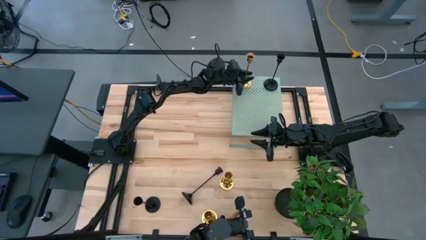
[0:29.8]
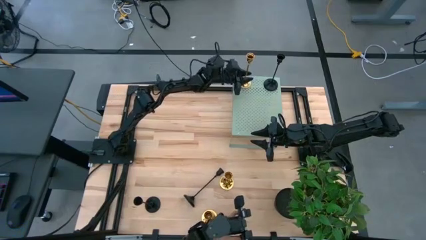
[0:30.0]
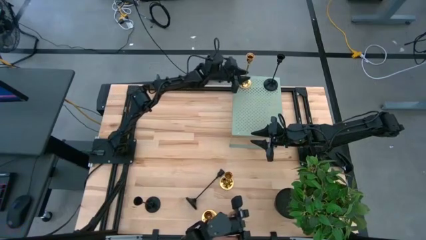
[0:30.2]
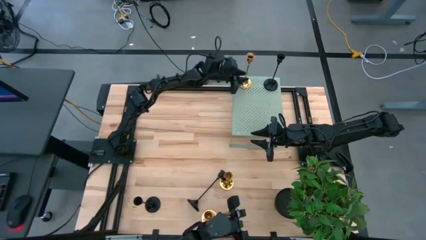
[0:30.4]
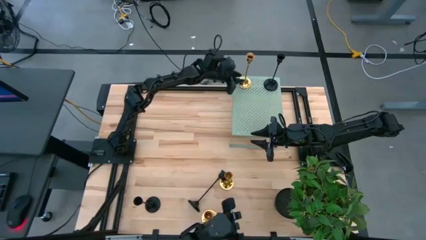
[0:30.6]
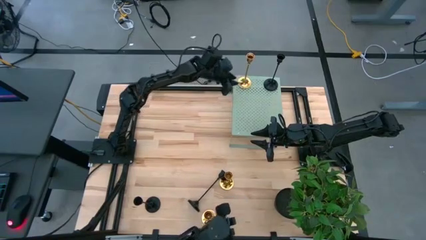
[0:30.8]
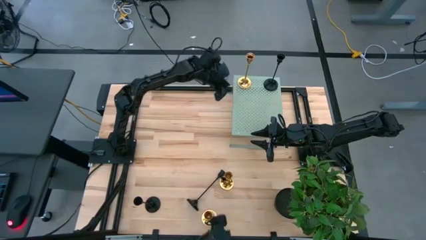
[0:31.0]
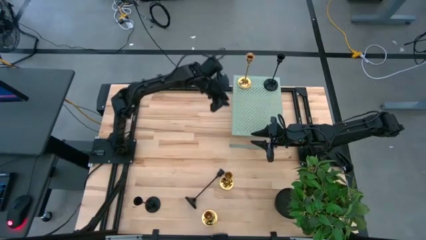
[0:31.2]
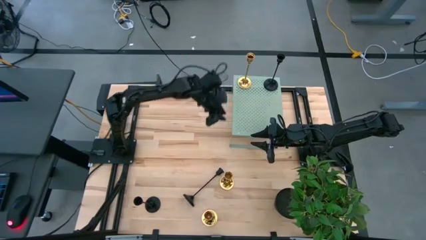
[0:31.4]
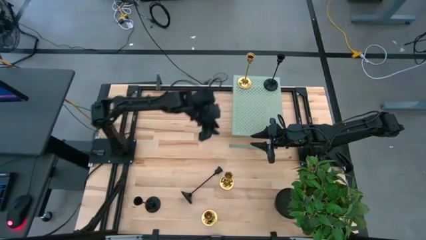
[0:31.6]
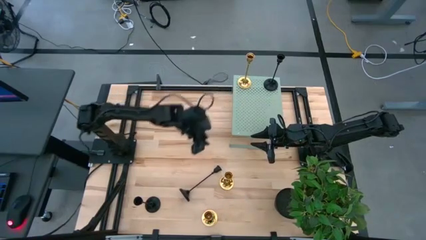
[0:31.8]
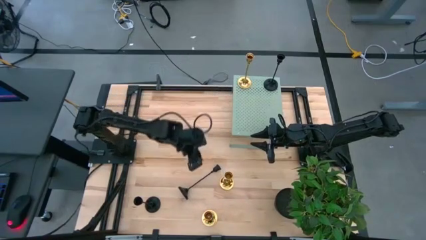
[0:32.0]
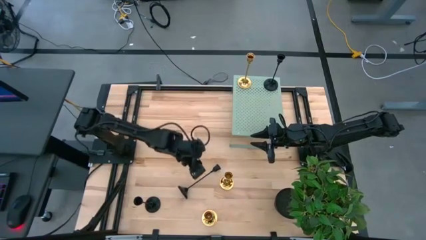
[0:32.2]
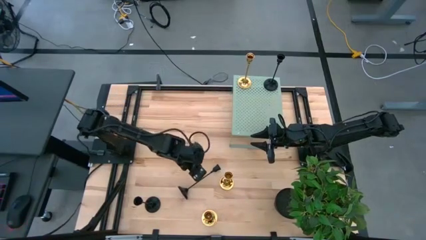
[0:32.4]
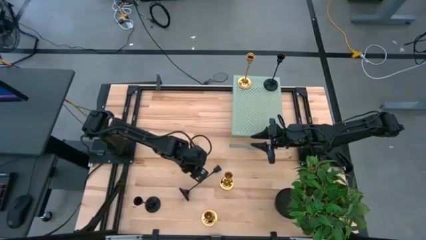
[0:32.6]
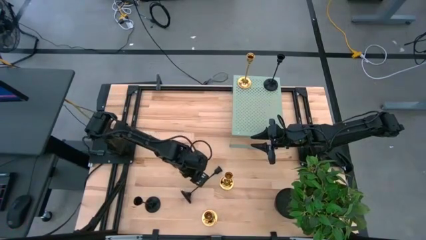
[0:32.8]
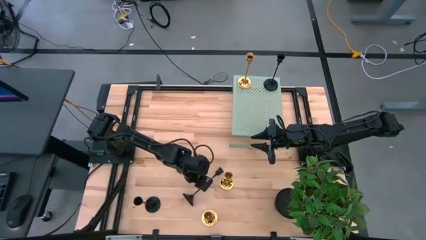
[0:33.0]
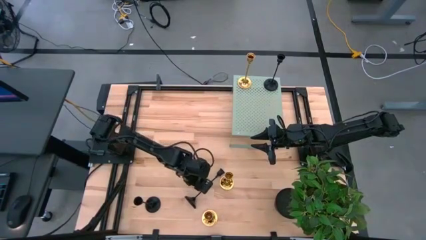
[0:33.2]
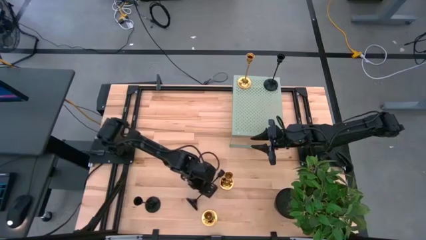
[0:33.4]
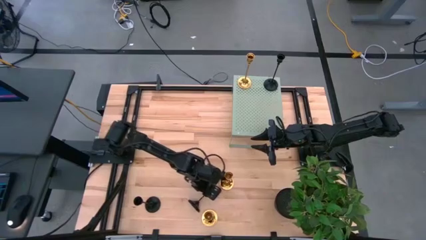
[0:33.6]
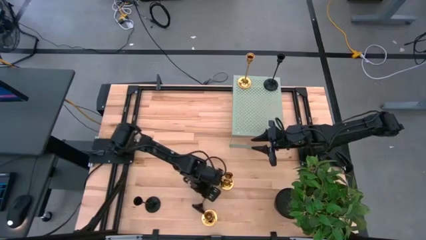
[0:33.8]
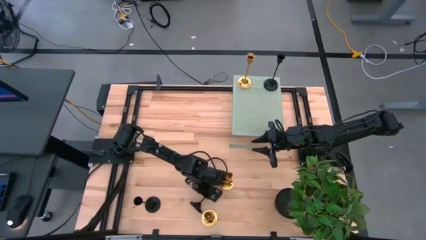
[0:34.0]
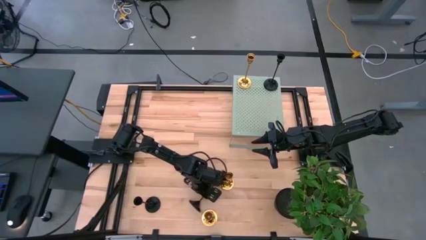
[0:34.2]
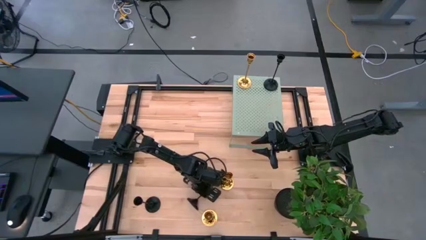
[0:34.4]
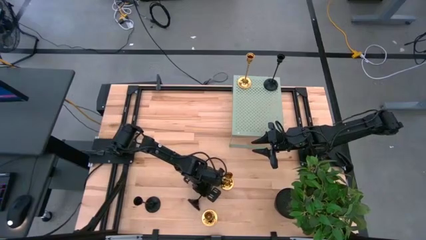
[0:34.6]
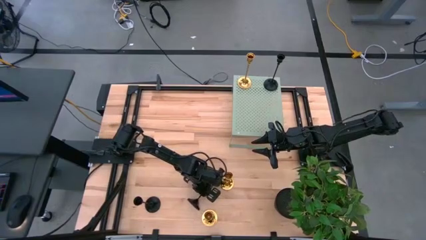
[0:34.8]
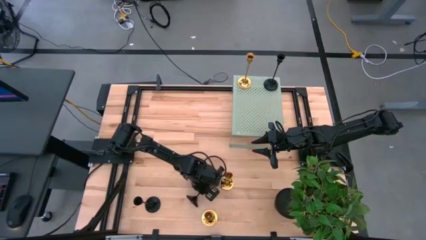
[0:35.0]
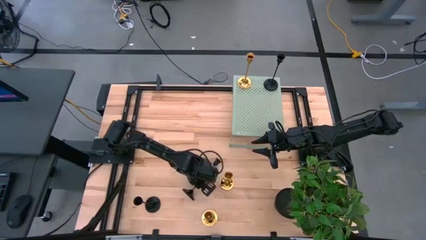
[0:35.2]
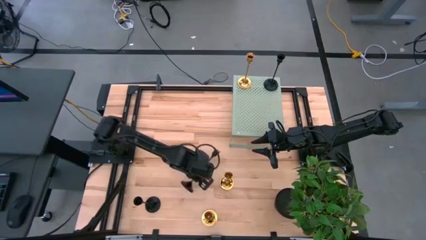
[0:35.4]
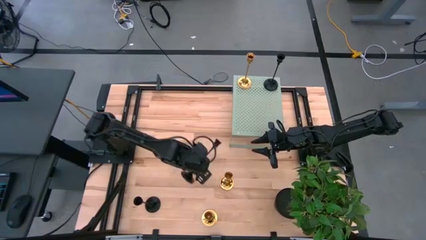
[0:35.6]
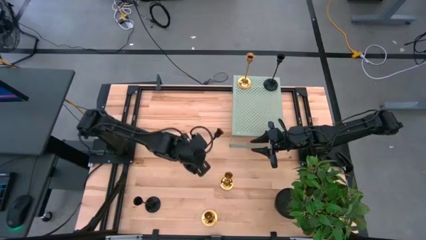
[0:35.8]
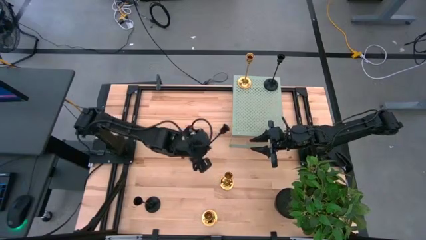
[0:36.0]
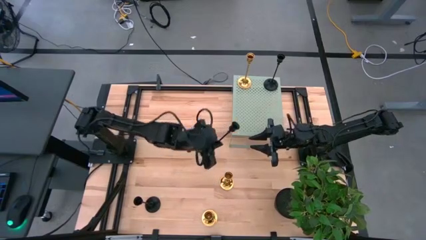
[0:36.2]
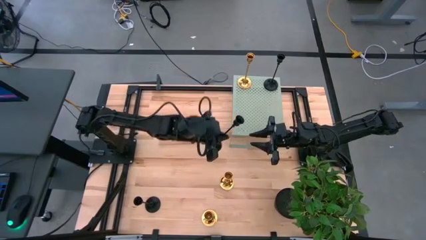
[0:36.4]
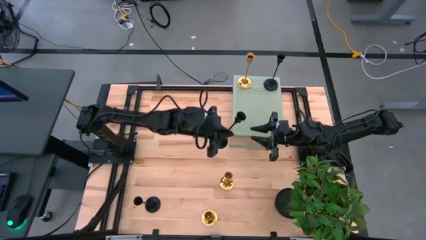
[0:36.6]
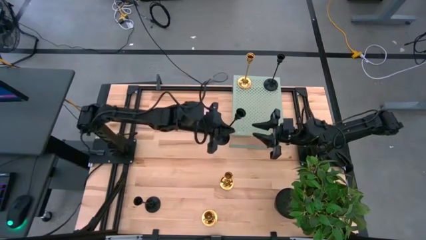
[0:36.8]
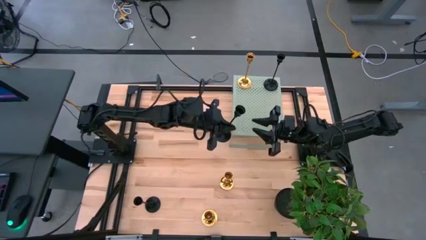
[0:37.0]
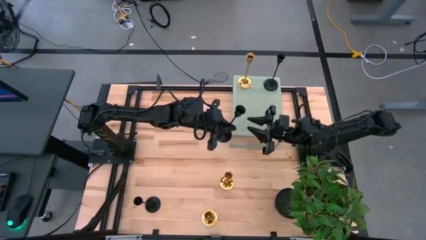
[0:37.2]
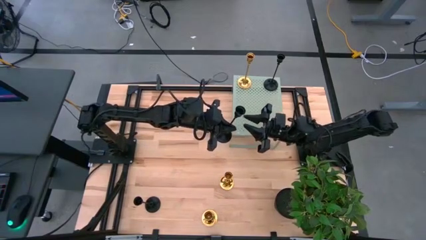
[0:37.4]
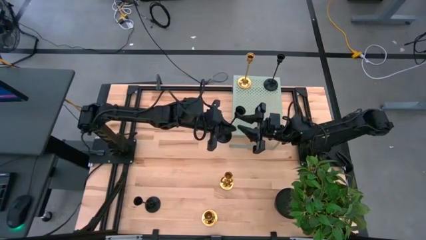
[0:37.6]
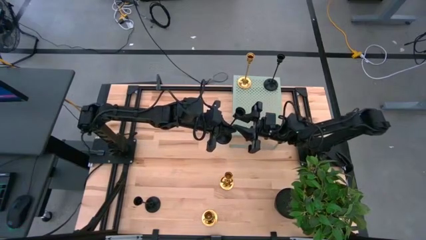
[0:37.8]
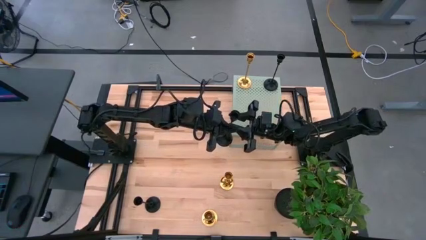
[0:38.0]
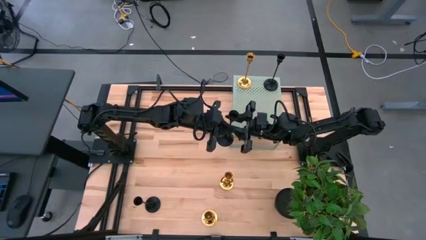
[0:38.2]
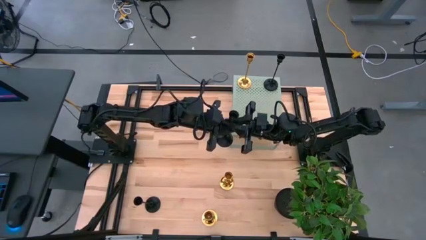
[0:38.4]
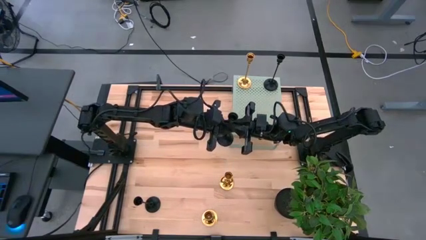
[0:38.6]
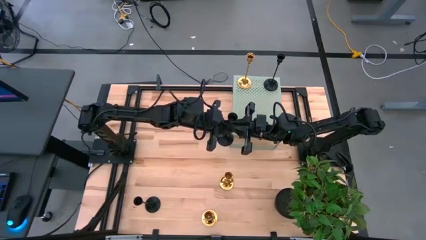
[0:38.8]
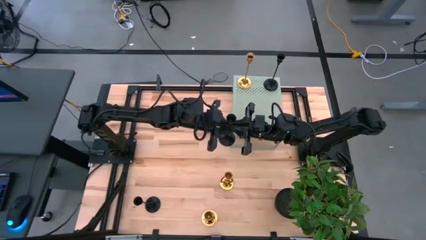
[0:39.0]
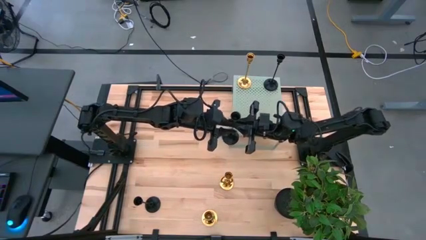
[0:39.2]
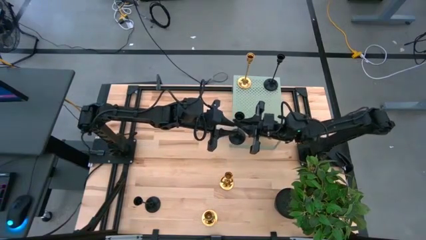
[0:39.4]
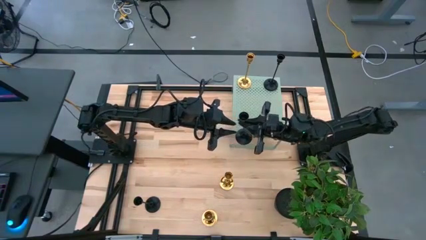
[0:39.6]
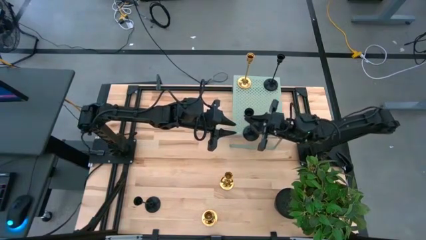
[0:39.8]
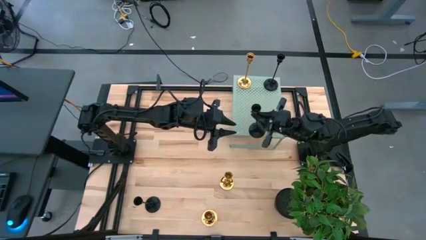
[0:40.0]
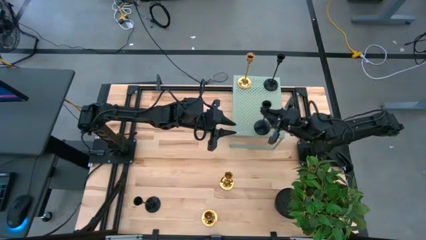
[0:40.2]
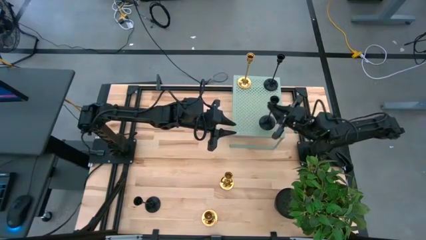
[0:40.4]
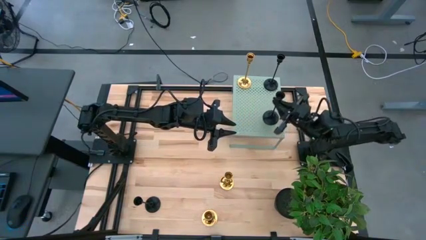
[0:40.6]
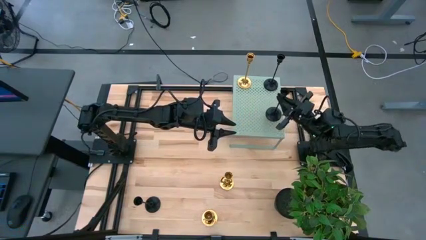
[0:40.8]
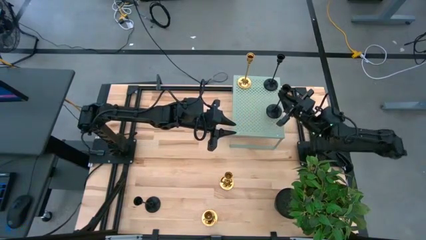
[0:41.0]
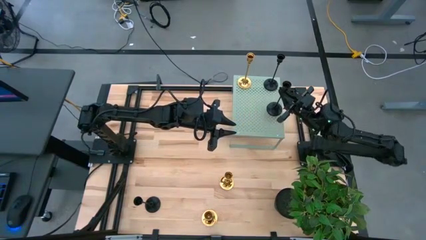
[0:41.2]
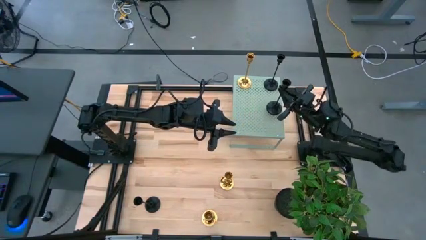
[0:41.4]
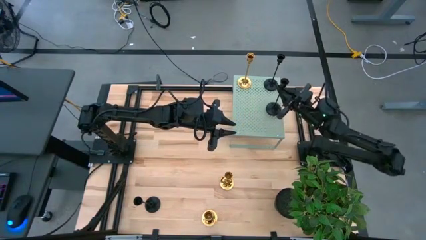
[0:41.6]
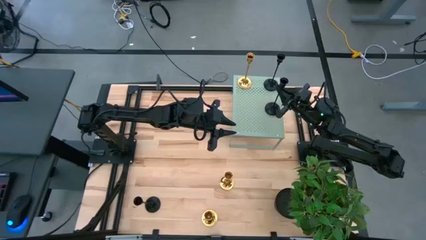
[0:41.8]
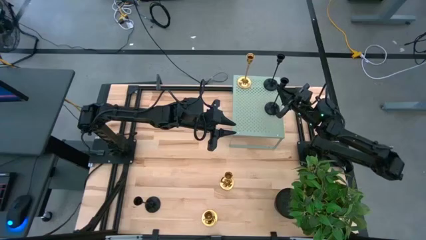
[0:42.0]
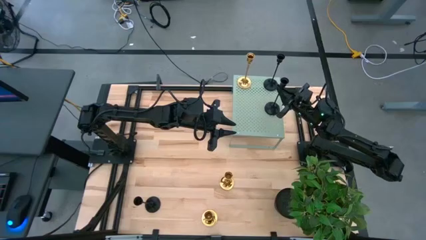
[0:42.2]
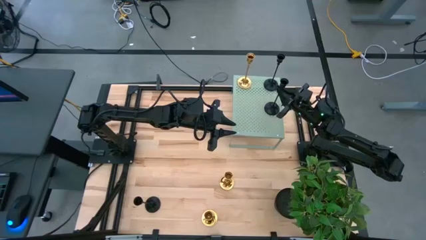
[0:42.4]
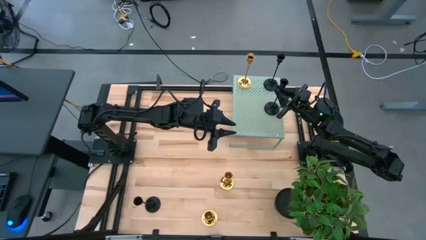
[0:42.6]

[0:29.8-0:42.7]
Task: Pick & Place candle stick holders
Put the right black candle holder on top of the shelf aligned with other black candle holder
